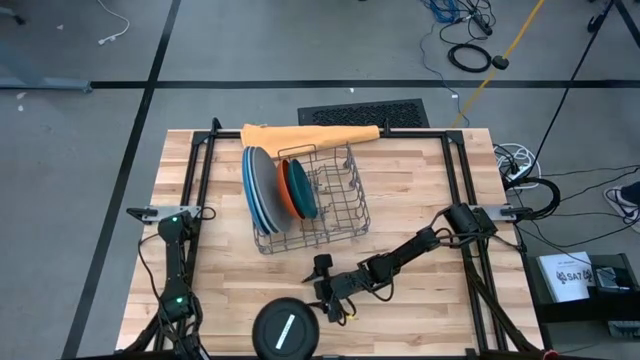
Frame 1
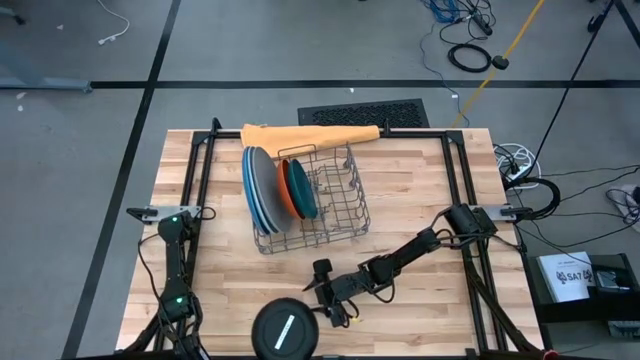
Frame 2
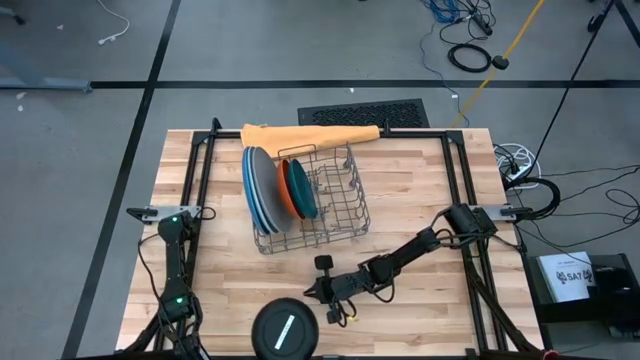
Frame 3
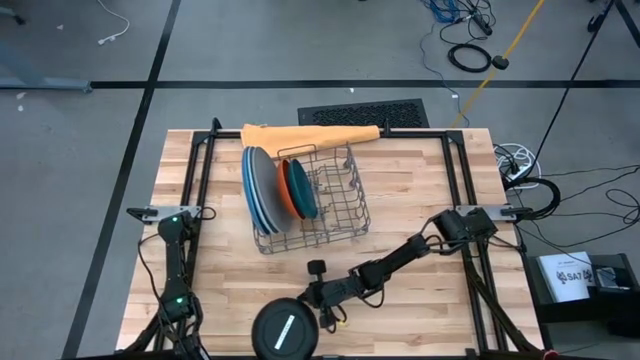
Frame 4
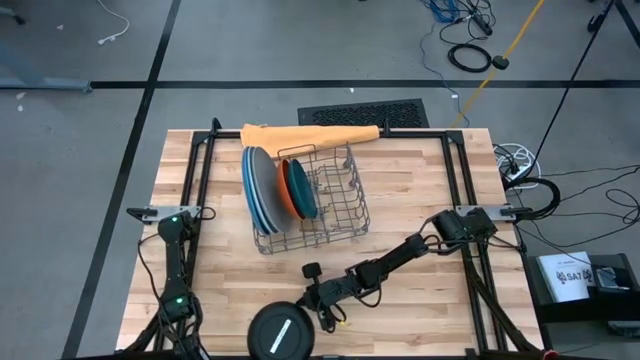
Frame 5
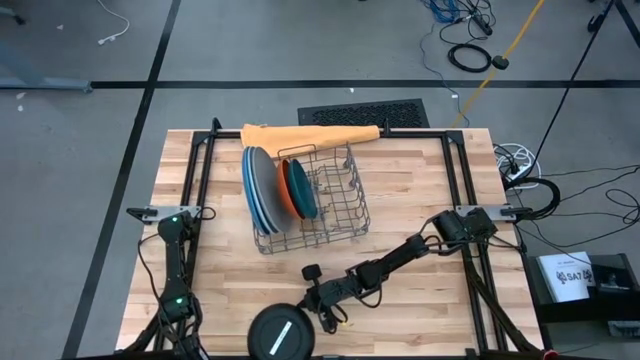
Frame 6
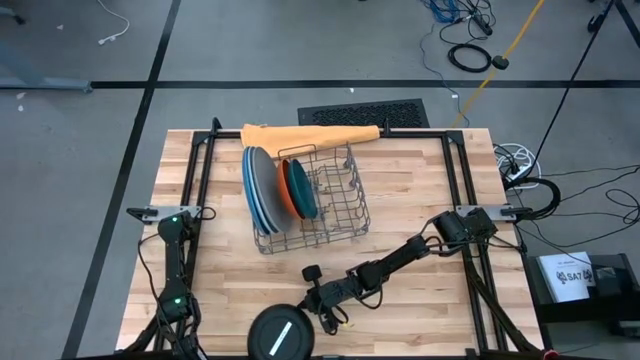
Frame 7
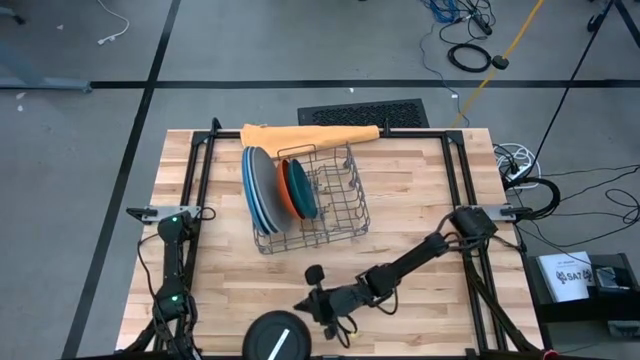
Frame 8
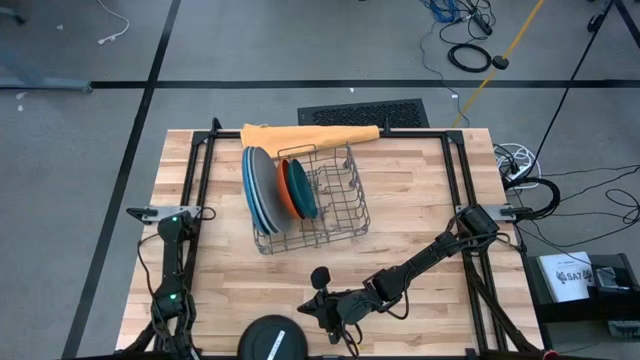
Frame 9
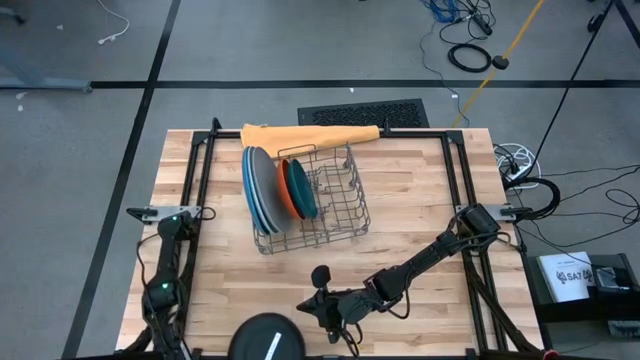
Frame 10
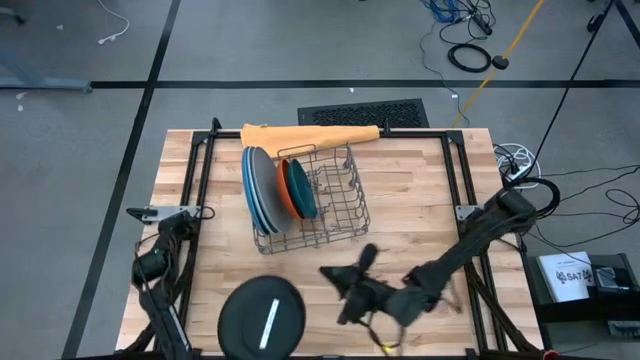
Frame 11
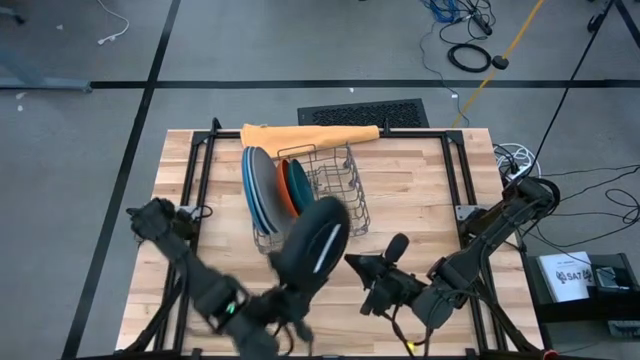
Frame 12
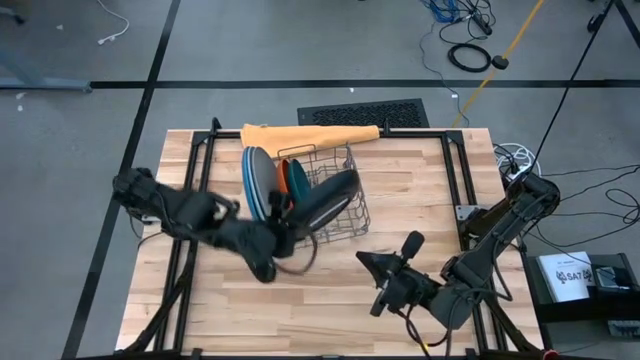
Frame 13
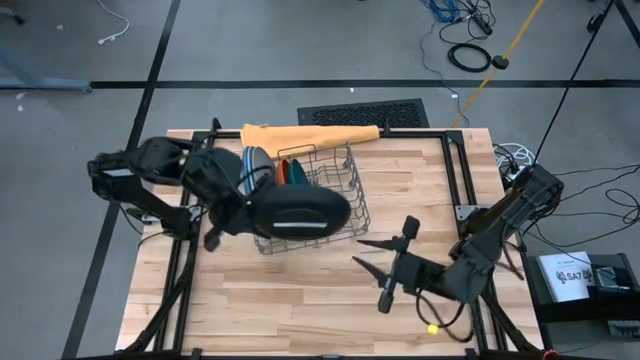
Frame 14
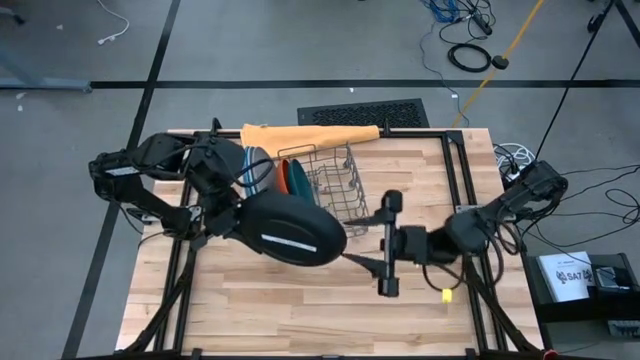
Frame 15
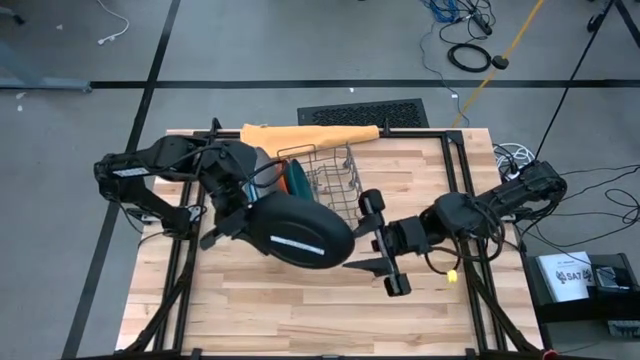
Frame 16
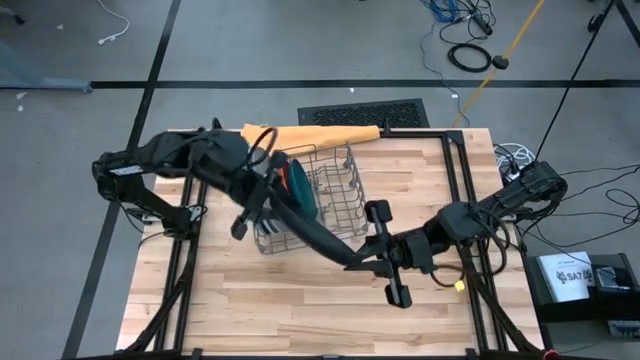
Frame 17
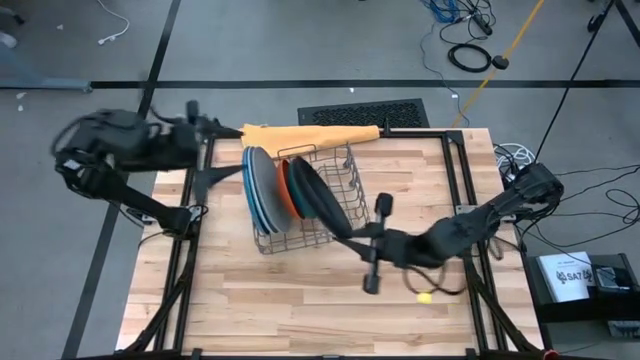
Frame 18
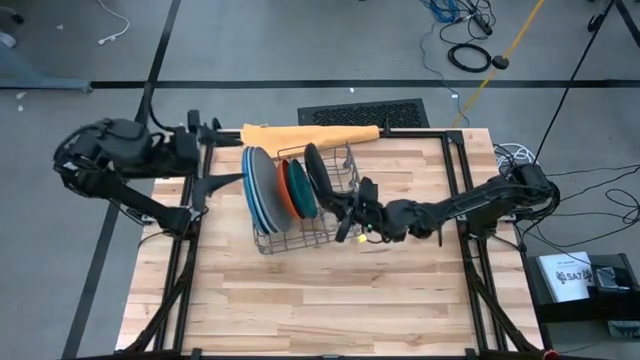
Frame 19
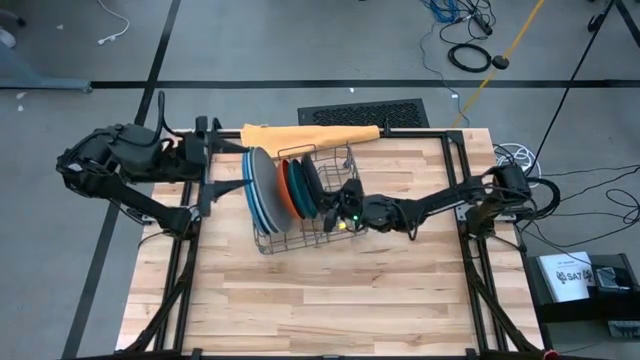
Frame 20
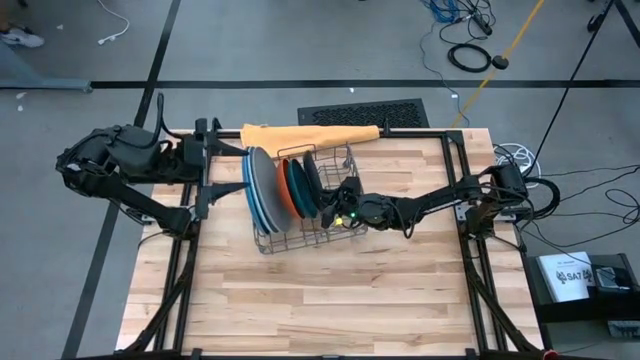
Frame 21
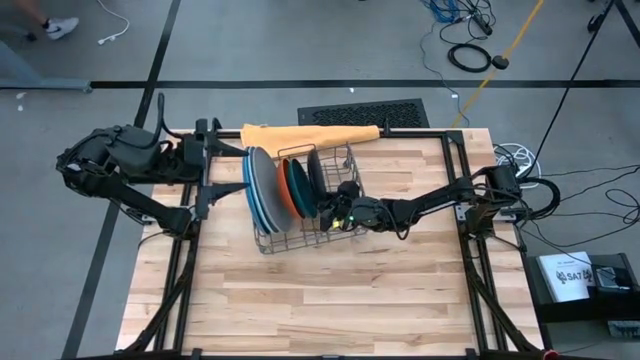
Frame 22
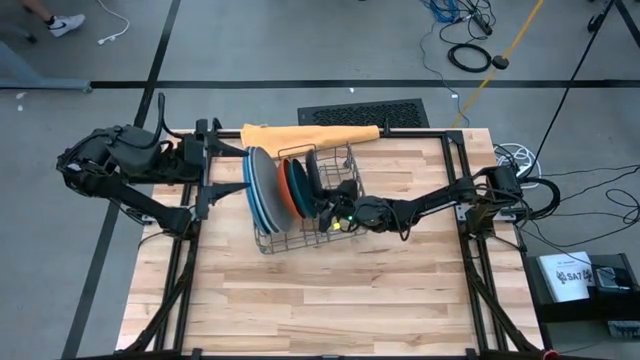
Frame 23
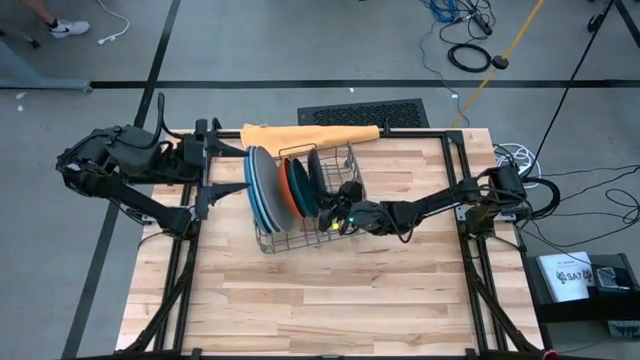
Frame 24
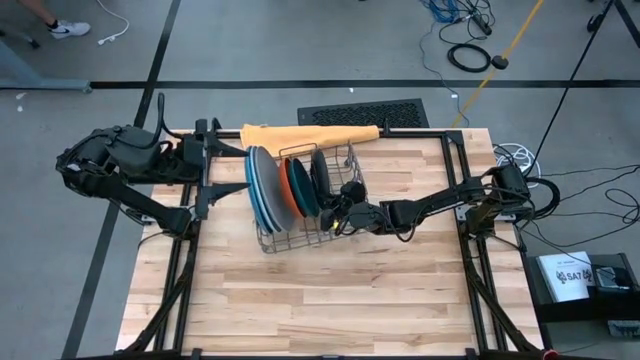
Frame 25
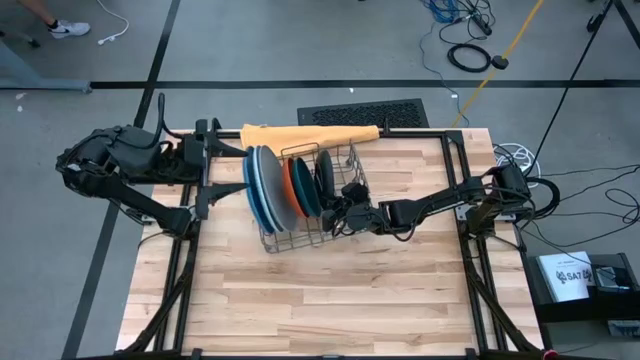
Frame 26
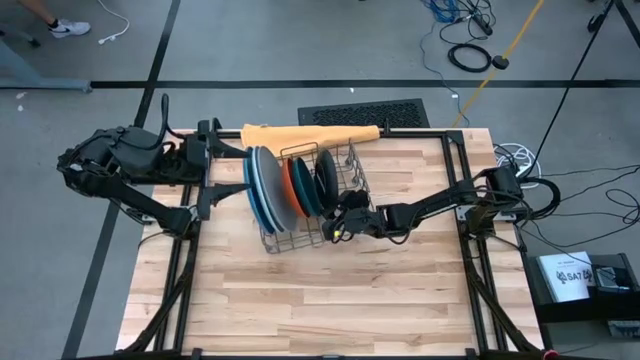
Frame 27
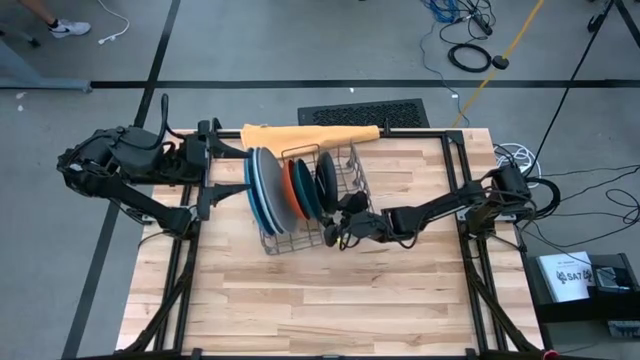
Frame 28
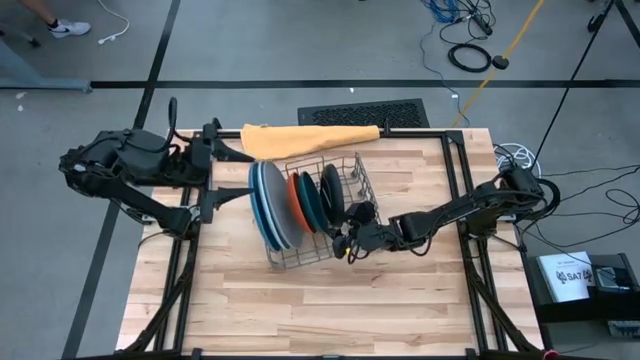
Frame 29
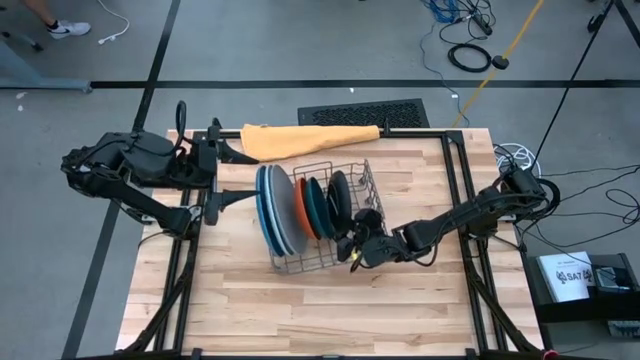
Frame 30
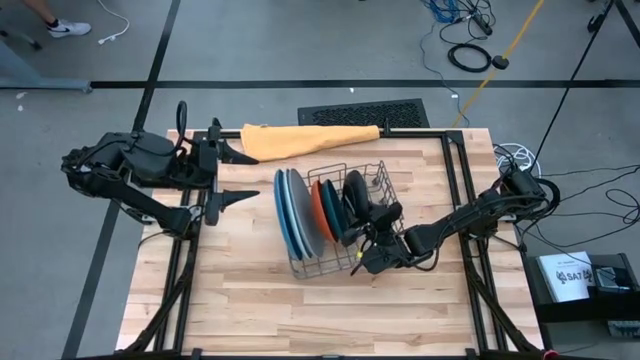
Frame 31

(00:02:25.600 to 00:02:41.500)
Task: Sort dishes
Put the black plate in the dish rack

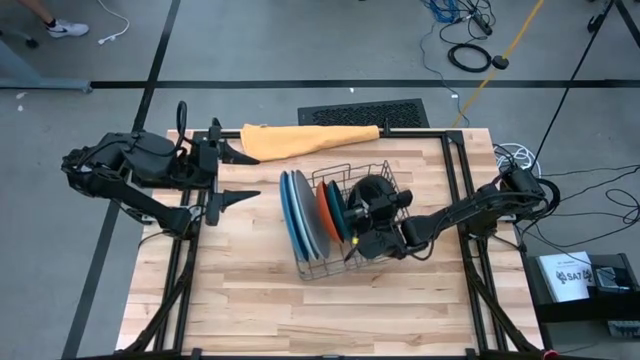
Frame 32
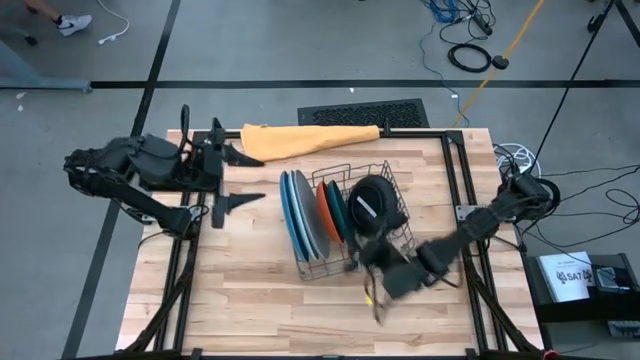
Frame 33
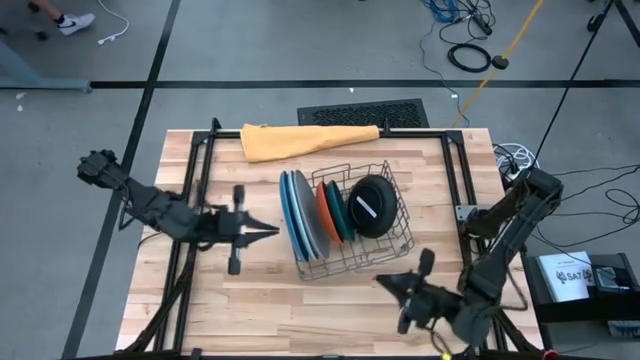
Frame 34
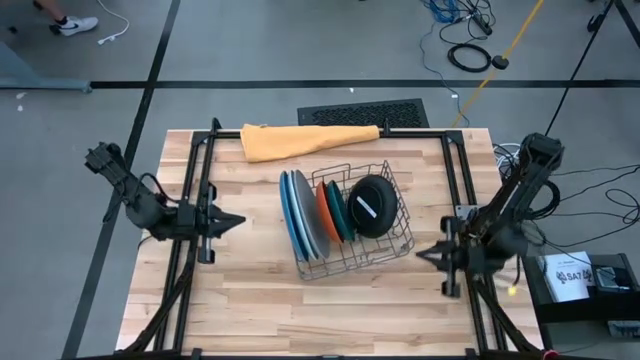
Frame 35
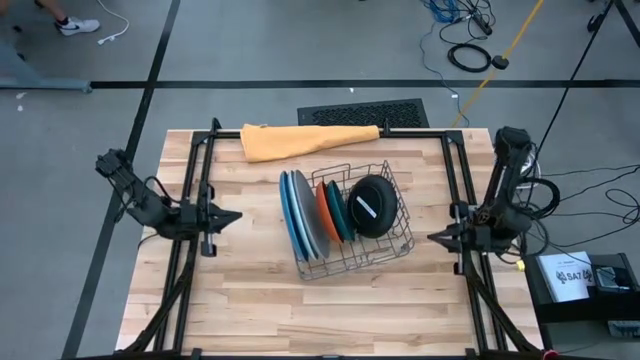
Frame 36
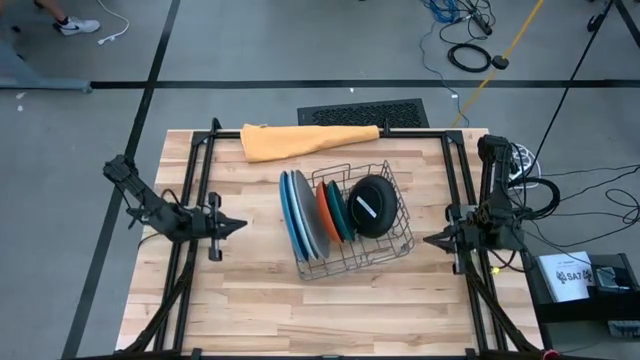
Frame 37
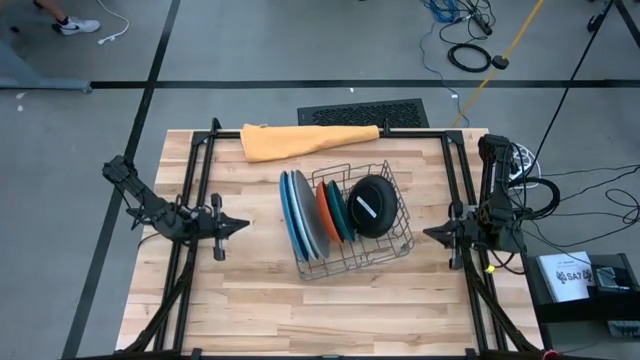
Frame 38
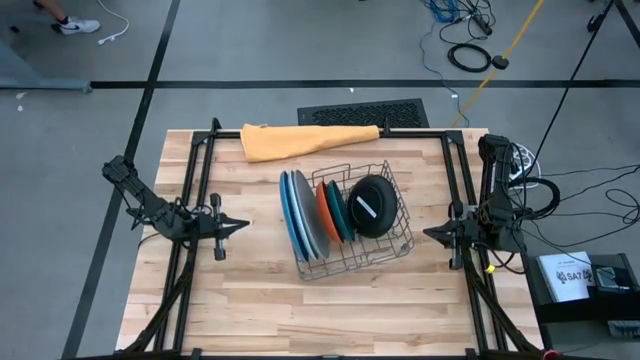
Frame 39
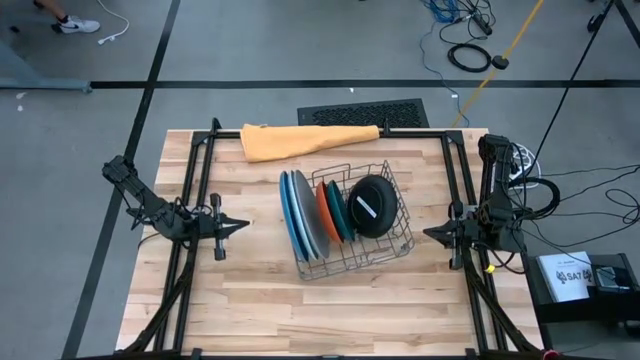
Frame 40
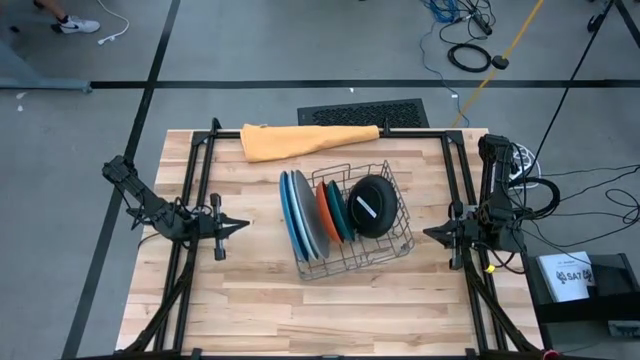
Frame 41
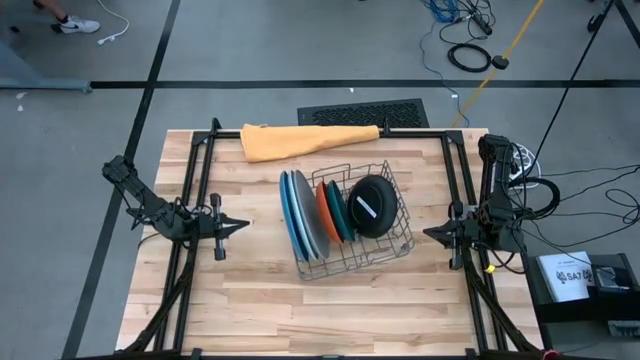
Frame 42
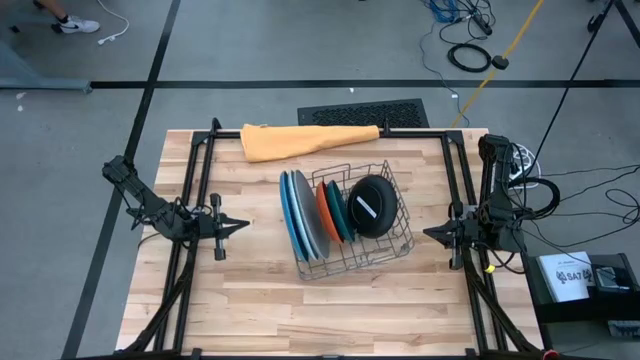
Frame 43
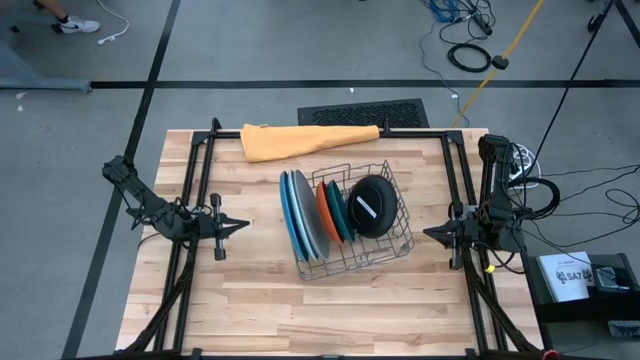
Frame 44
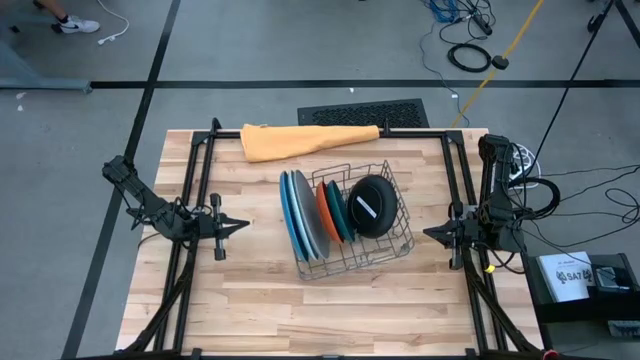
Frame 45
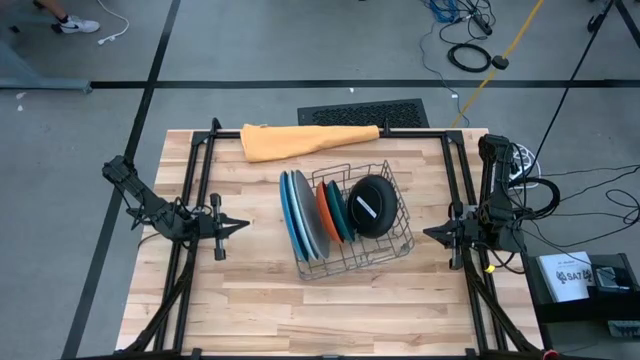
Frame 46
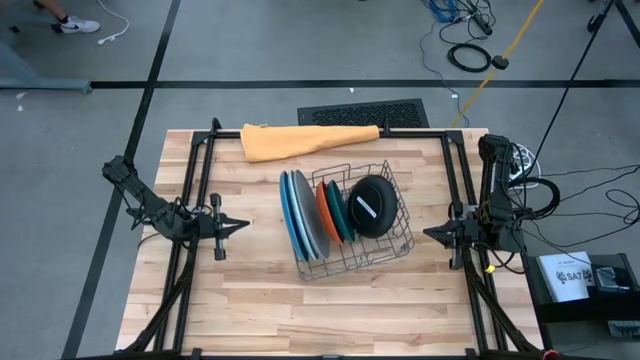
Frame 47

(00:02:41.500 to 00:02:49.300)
Return to Home Position
